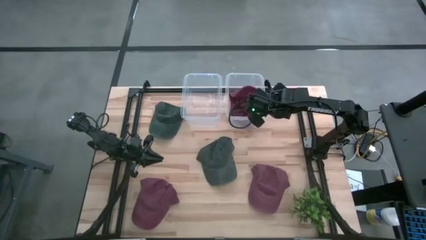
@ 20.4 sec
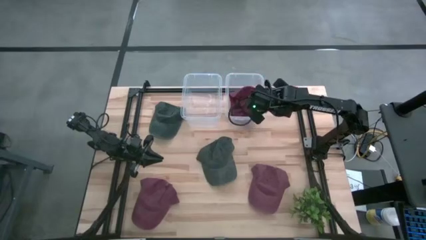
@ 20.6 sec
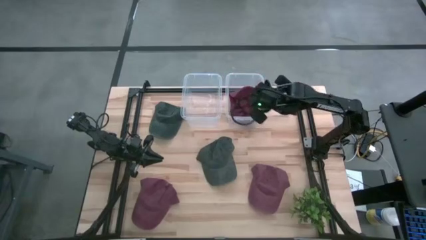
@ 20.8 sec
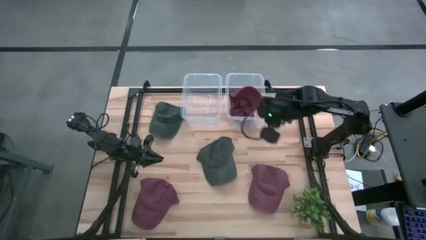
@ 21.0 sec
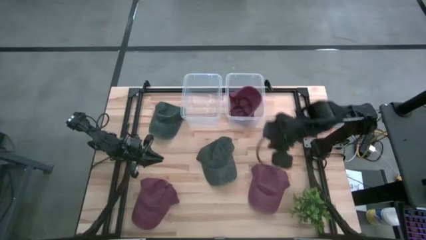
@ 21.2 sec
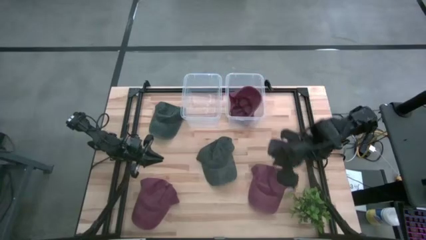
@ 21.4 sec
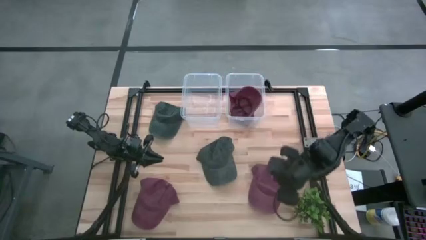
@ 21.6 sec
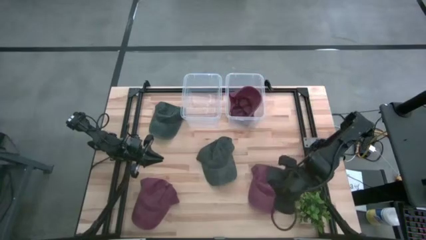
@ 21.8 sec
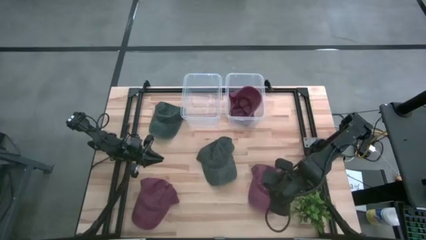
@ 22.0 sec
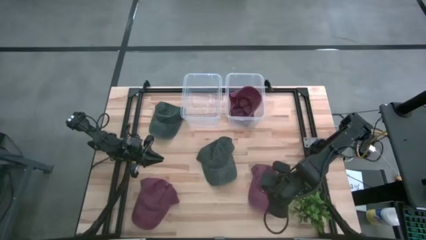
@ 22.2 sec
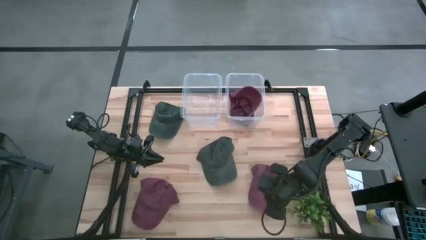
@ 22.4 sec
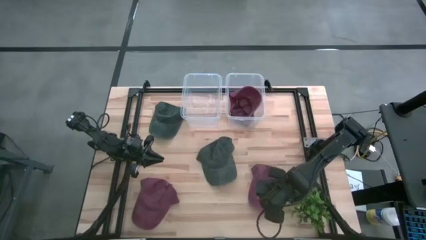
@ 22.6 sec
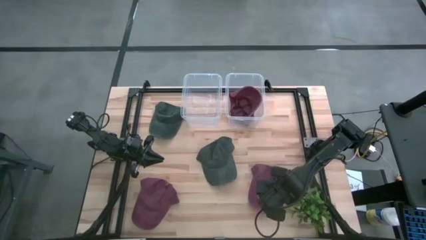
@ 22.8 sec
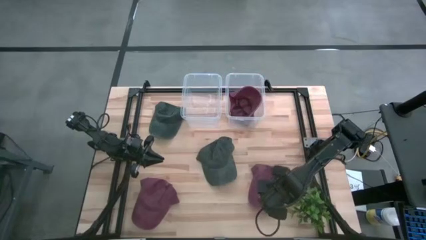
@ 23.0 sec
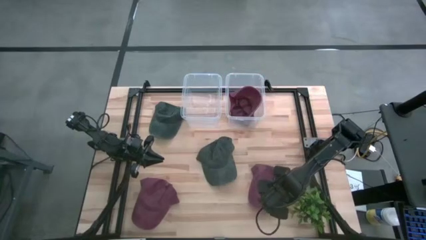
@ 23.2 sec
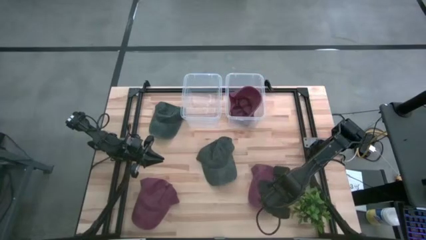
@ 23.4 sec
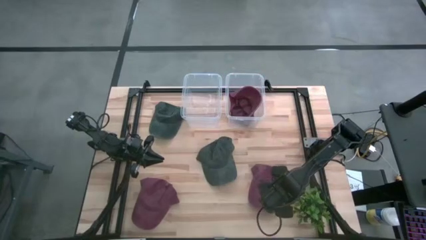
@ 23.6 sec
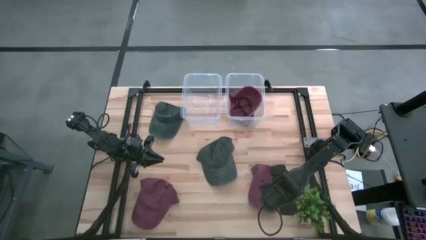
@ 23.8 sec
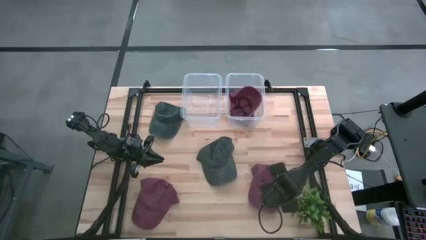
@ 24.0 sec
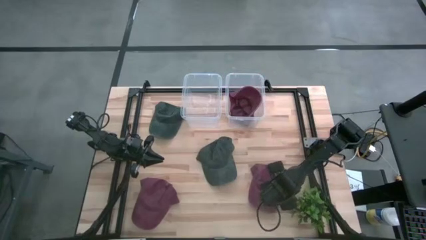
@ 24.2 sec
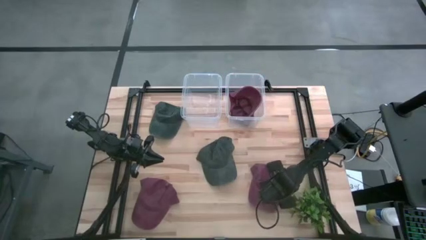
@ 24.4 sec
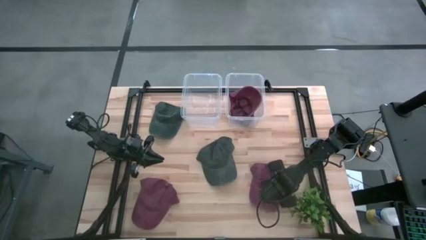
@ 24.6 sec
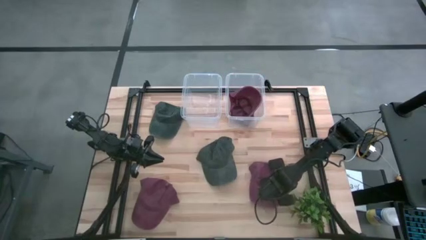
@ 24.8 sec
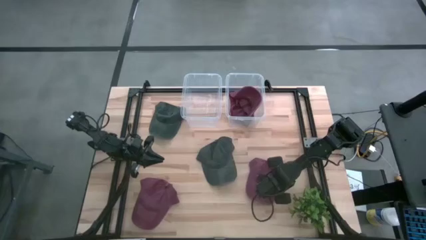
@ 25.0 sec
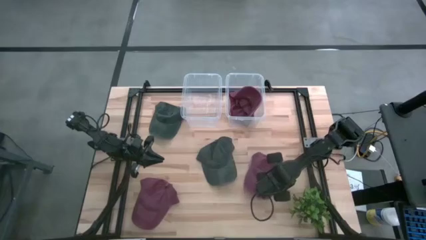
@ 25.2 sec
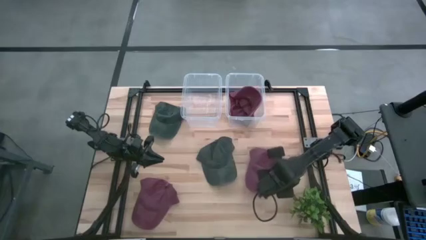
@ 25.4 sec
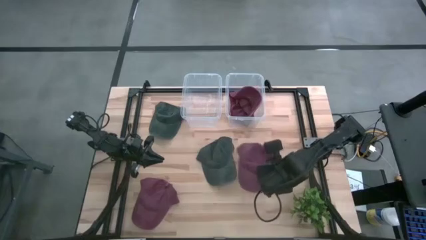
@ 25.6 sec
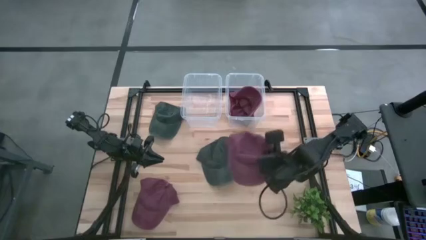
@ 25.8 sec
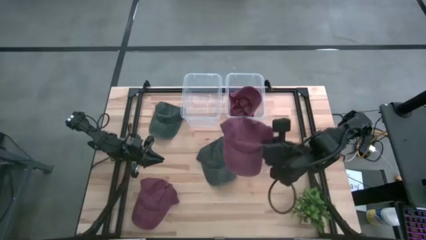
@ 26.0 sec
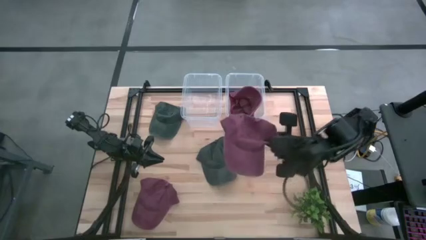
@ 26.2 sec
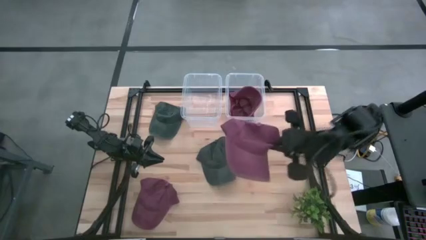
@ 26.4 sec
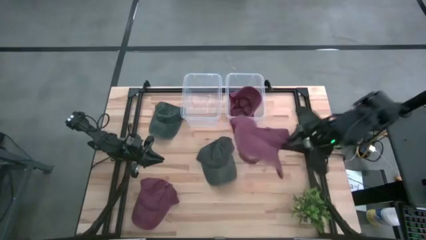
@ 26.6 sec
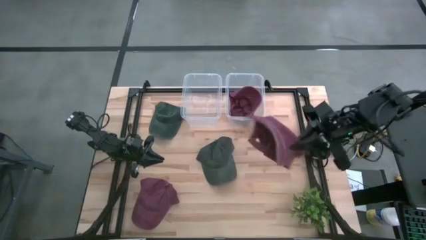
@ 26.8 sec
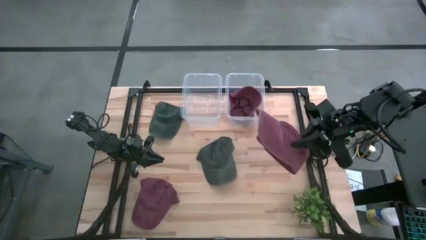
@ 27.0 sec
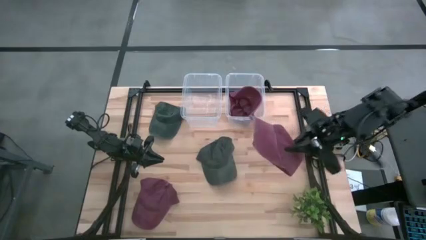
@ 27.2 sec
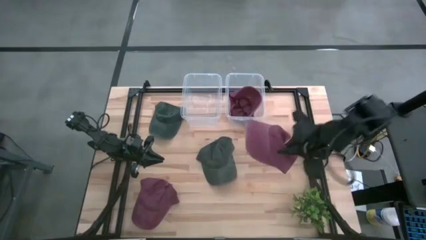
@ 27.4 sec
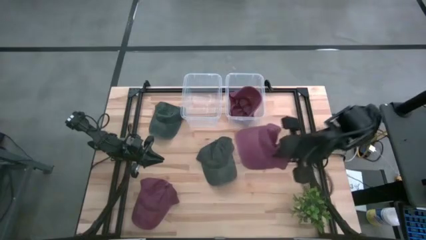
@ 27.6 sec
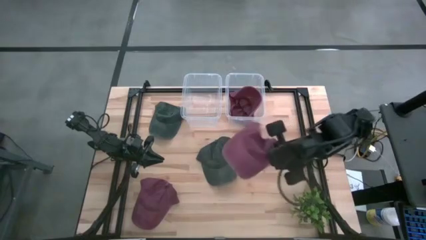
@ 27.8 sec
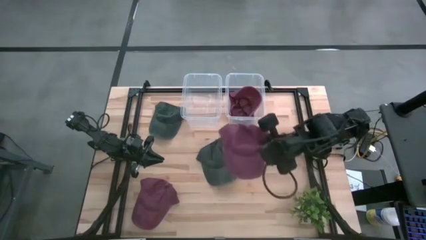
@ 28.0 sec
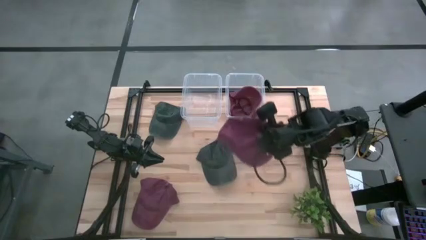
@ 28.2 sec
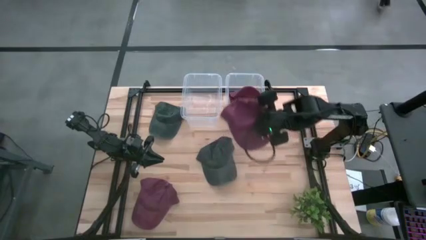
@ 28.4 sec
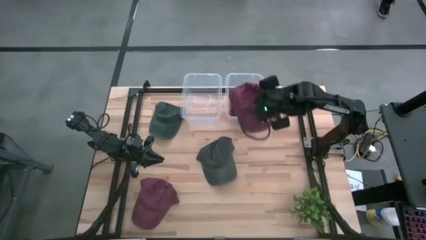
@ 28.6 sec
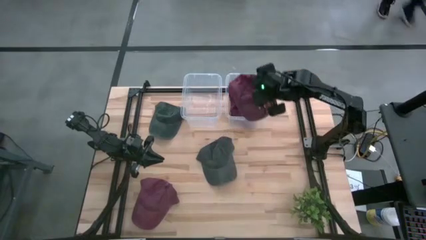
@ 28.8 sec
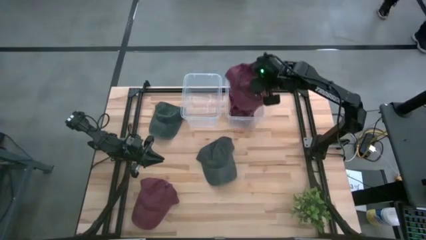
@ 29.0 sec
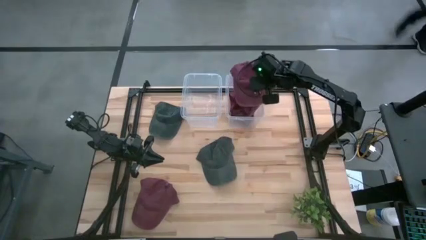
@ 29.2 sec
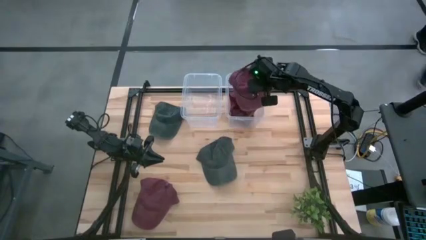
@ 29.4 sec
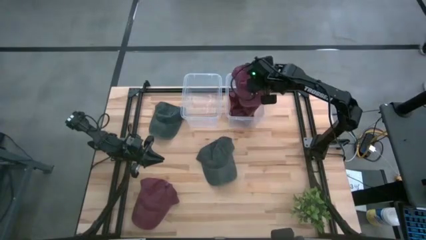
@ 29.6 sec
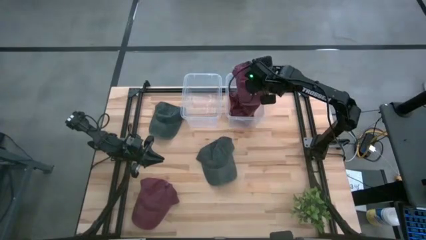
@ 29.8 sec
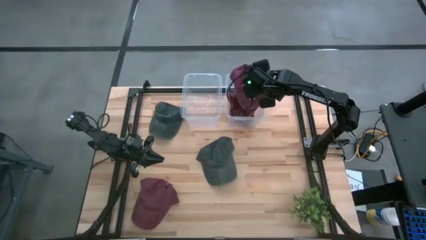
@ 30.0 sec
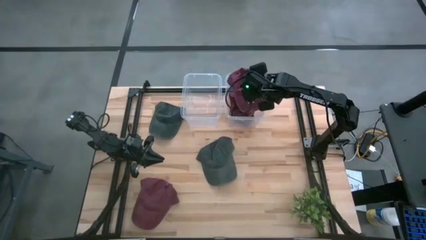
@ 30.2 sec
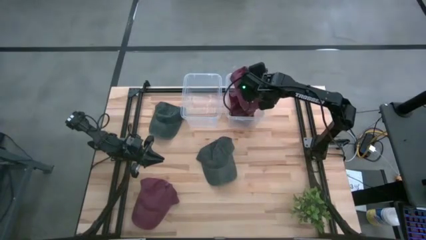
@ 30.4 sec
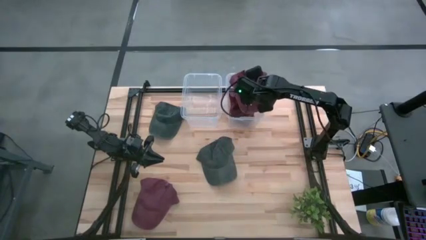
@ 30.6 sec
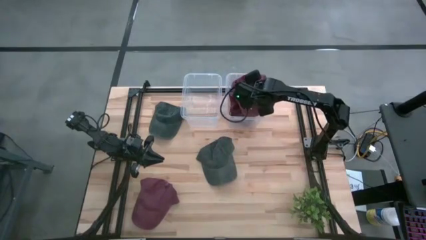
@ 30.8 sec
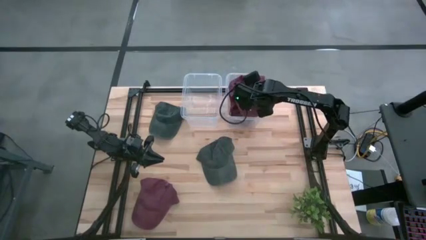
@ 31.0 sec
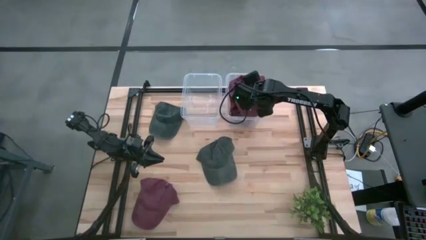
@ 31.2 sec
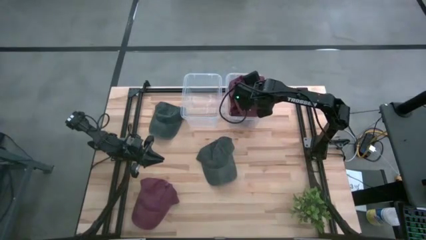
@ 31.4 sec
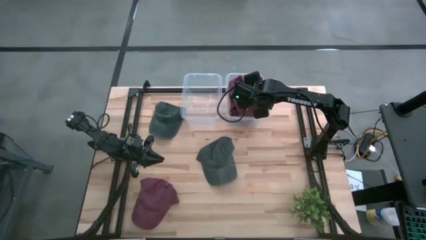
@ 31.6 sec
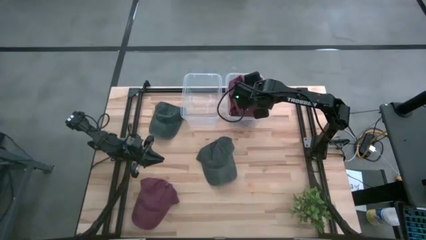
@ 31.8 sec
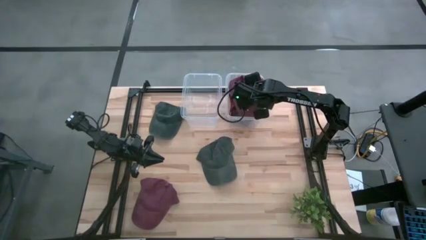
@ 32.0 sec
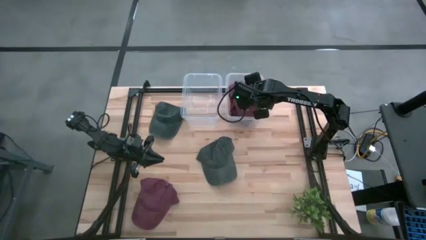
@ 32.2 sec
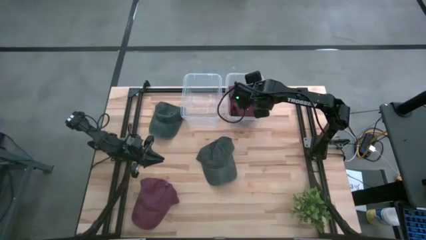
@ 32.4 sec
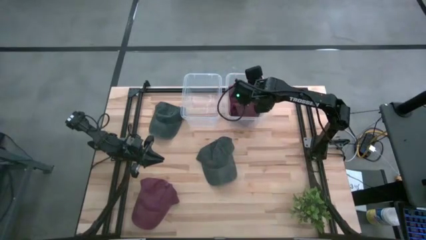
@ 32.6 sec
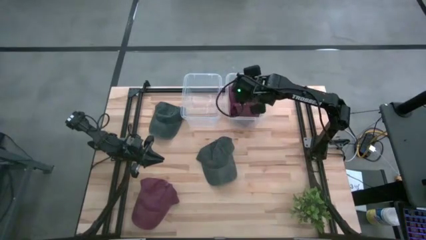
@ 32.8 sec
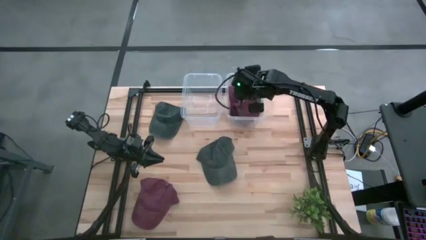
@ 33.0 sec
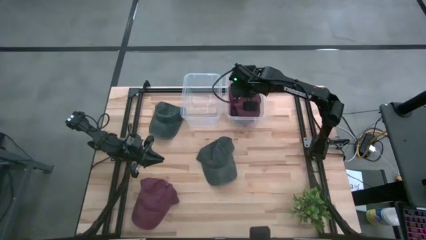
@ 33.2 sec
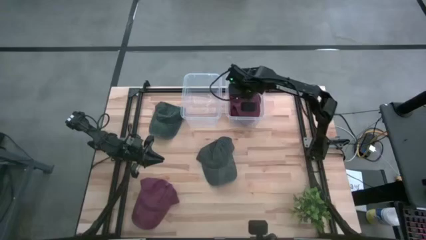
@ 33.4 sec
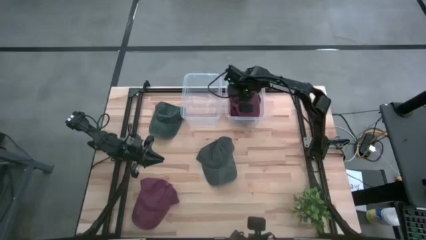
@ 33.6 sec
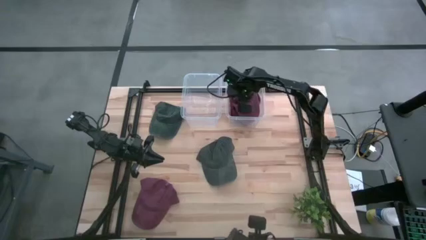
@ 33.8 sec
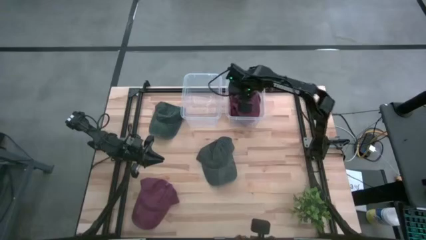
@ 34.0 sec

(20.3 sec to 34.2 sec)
Task: Pick & Place hat
Put the right red cap into the right transparent bin
